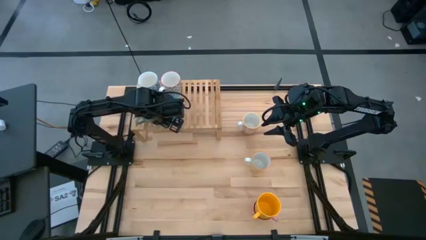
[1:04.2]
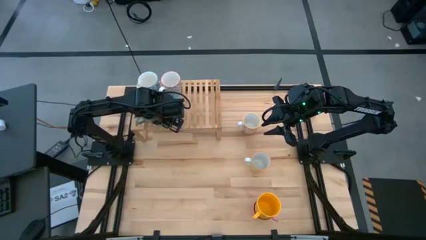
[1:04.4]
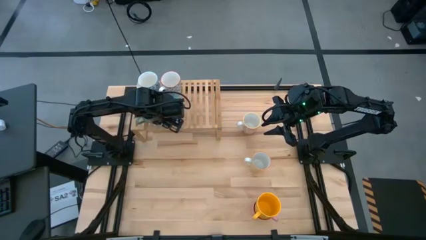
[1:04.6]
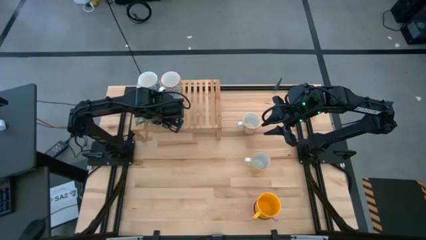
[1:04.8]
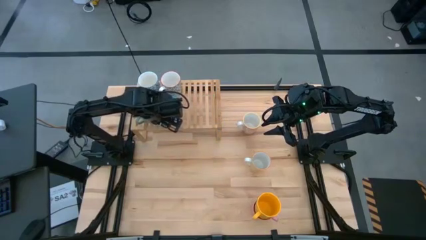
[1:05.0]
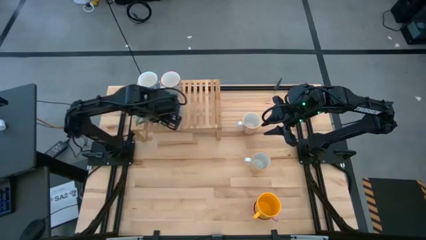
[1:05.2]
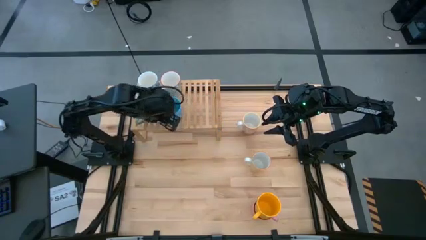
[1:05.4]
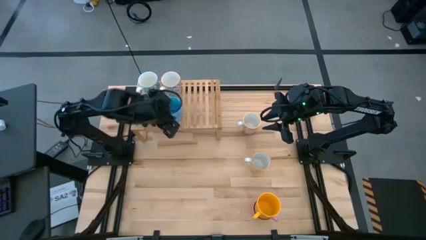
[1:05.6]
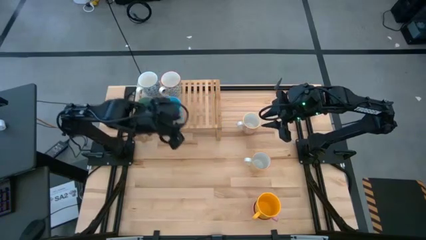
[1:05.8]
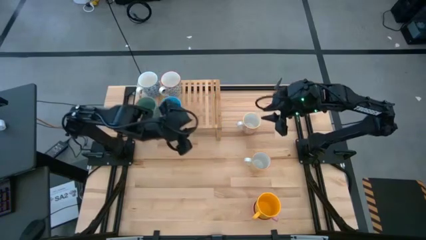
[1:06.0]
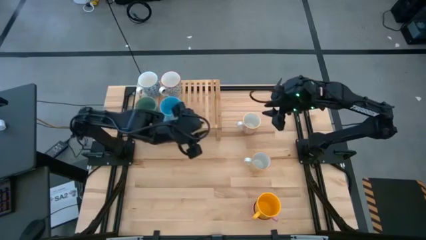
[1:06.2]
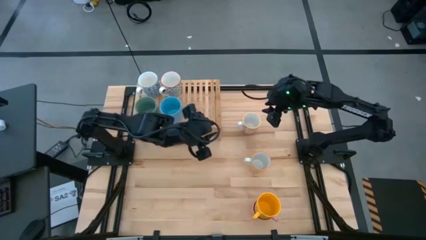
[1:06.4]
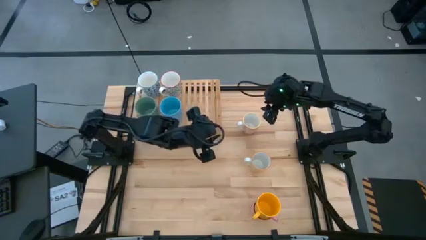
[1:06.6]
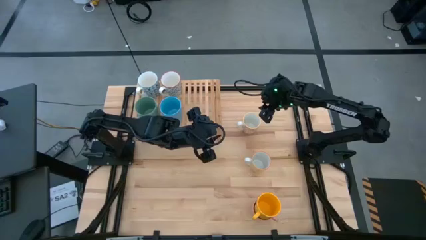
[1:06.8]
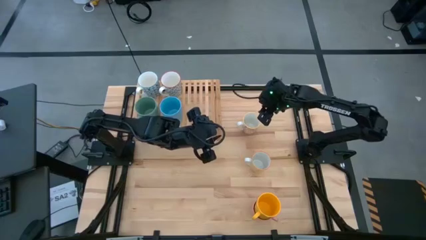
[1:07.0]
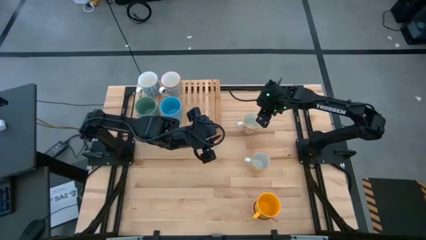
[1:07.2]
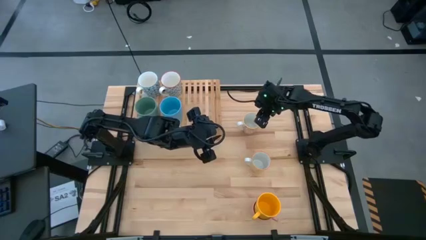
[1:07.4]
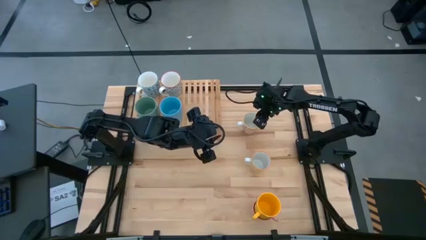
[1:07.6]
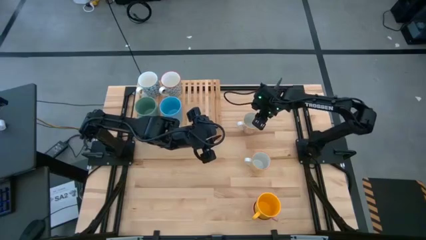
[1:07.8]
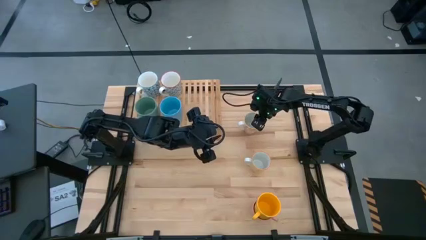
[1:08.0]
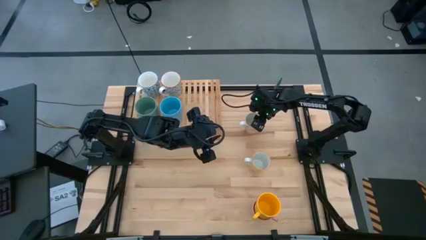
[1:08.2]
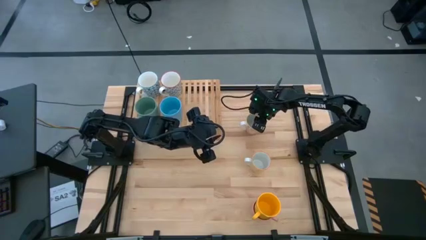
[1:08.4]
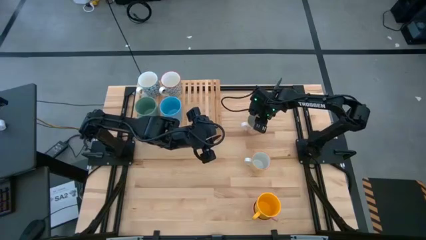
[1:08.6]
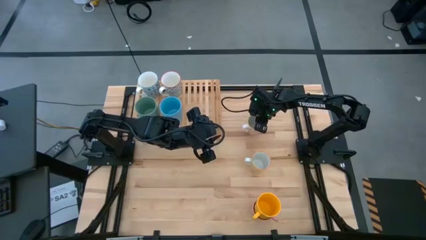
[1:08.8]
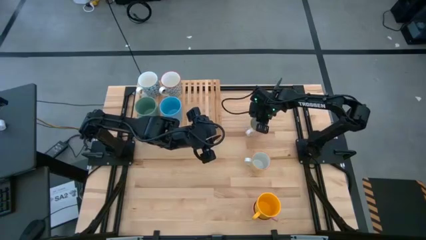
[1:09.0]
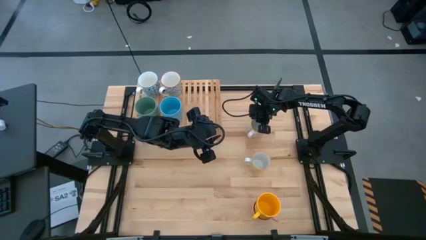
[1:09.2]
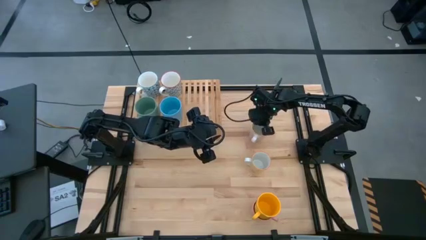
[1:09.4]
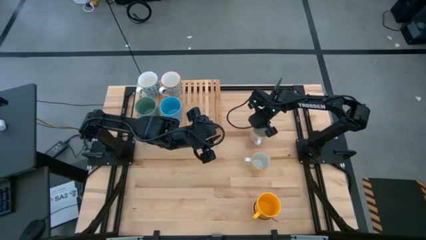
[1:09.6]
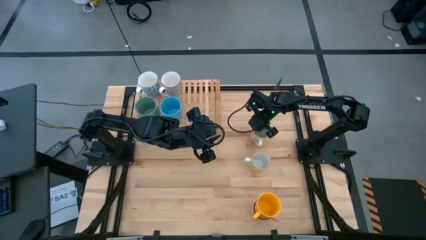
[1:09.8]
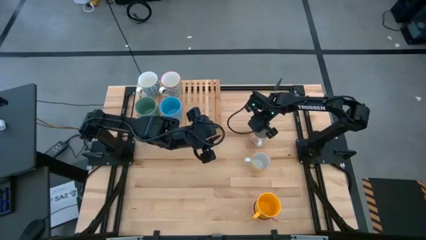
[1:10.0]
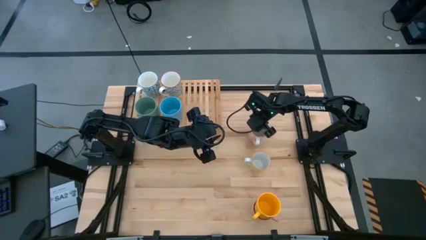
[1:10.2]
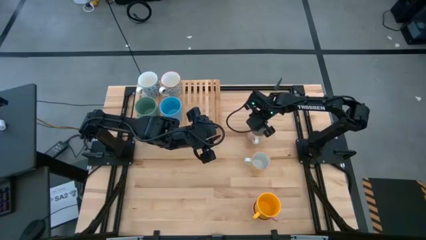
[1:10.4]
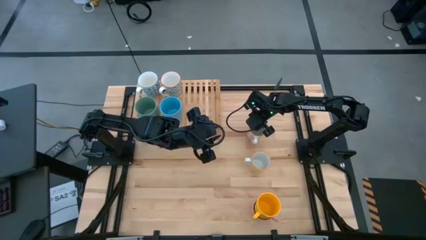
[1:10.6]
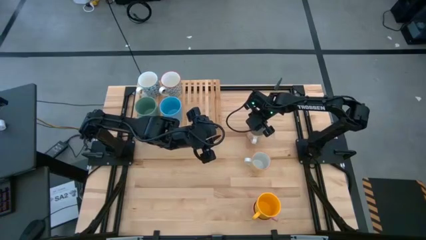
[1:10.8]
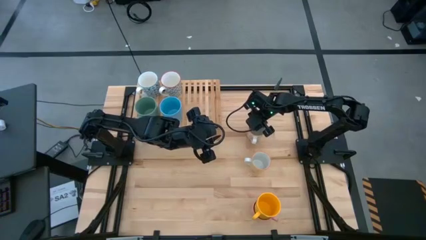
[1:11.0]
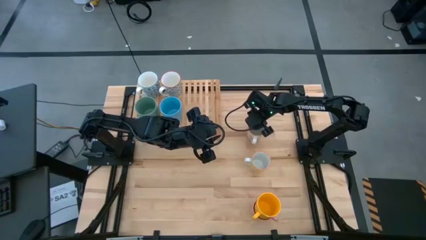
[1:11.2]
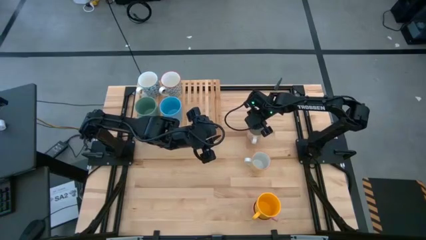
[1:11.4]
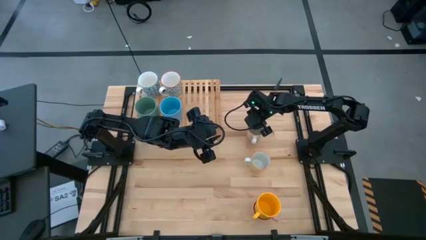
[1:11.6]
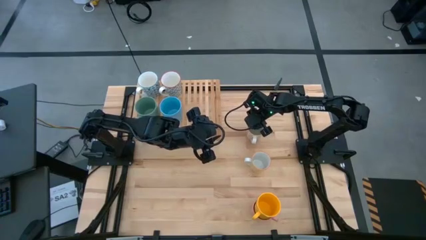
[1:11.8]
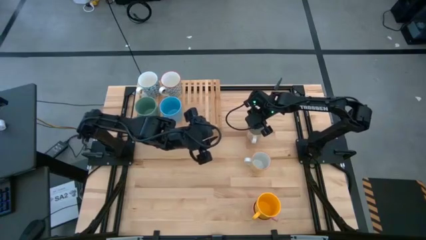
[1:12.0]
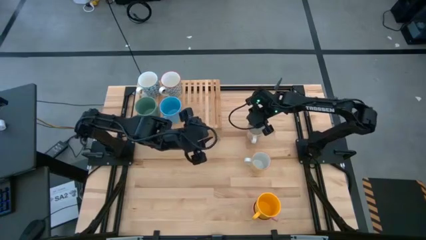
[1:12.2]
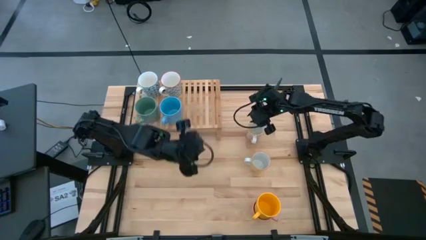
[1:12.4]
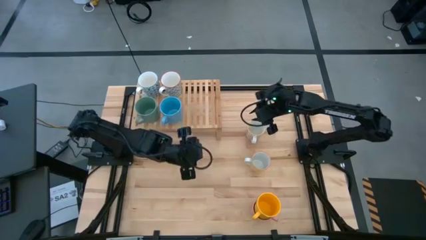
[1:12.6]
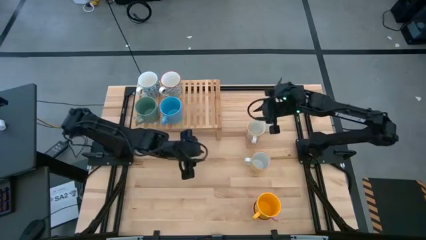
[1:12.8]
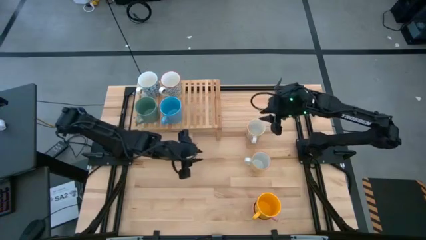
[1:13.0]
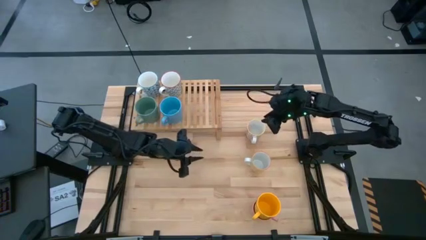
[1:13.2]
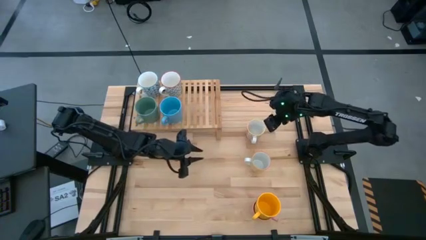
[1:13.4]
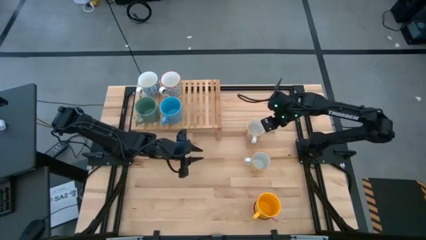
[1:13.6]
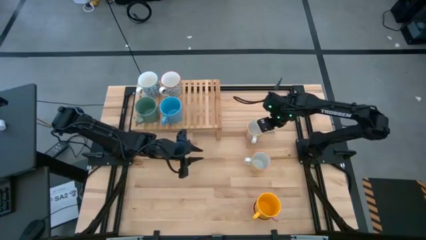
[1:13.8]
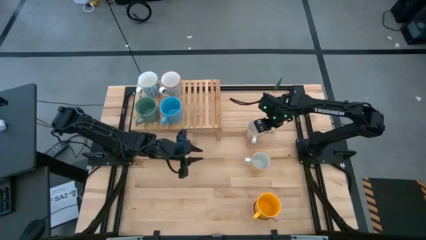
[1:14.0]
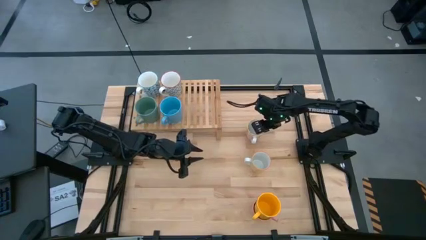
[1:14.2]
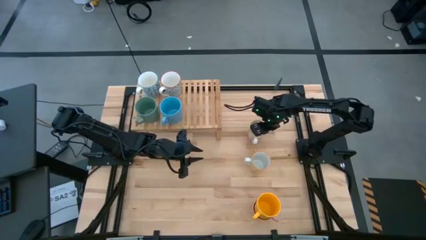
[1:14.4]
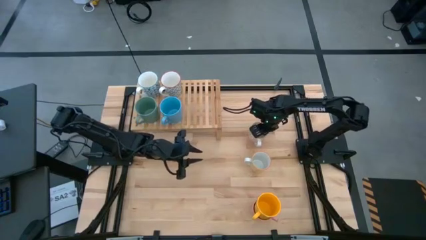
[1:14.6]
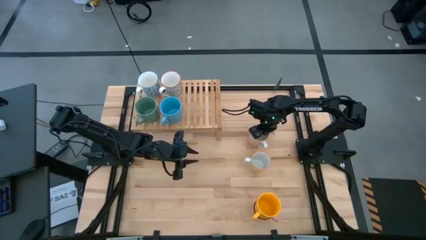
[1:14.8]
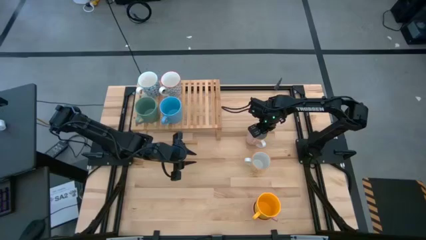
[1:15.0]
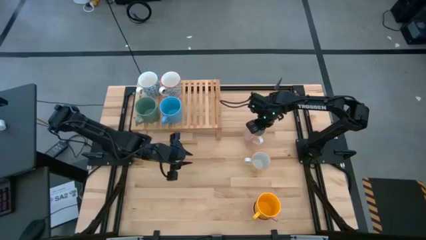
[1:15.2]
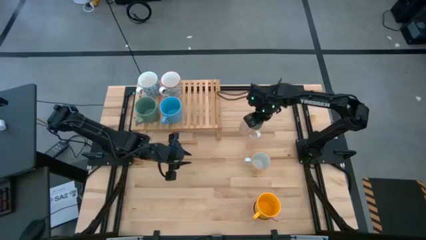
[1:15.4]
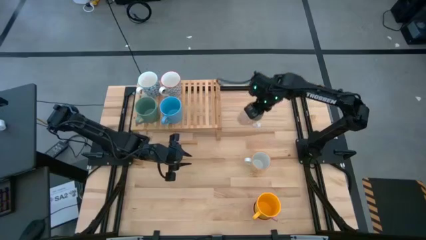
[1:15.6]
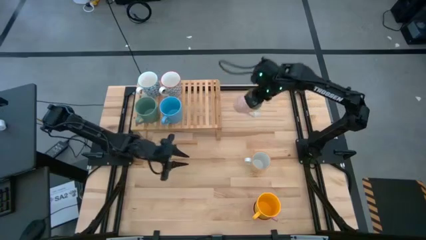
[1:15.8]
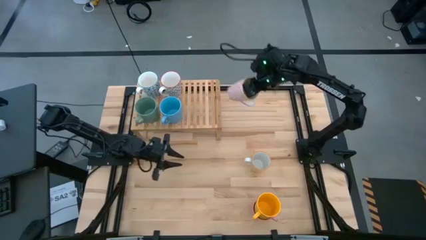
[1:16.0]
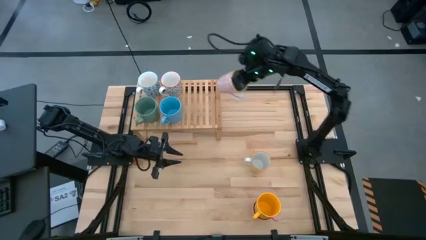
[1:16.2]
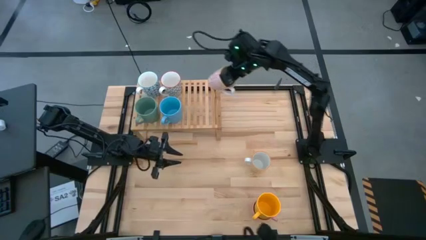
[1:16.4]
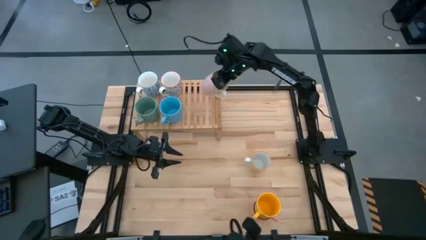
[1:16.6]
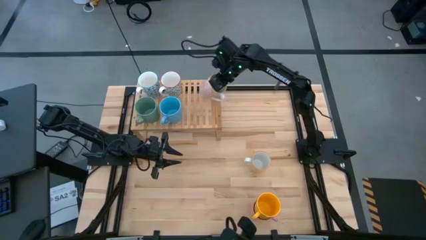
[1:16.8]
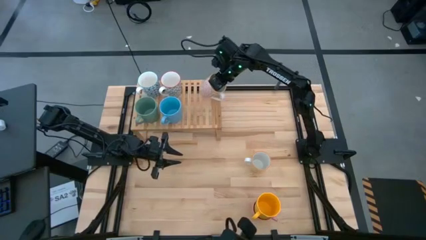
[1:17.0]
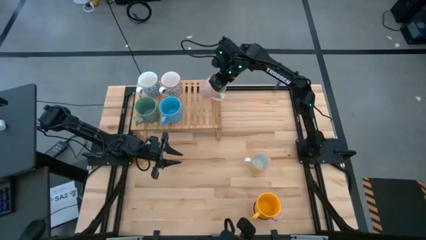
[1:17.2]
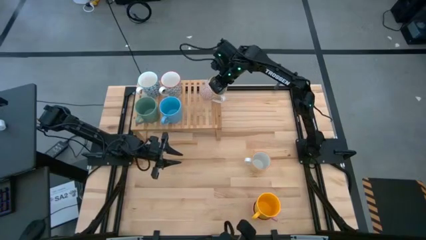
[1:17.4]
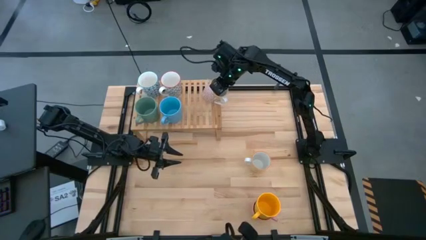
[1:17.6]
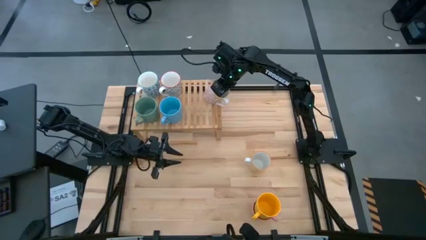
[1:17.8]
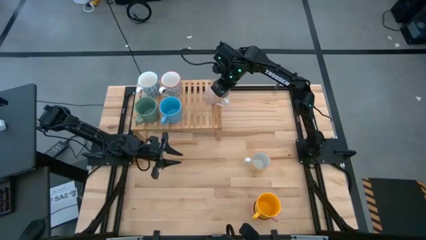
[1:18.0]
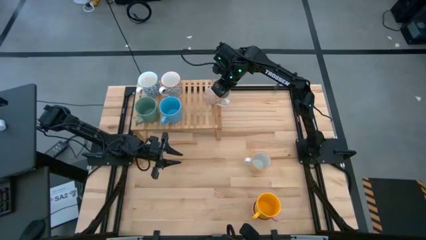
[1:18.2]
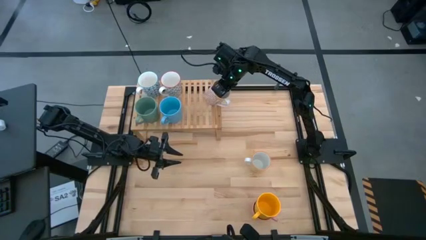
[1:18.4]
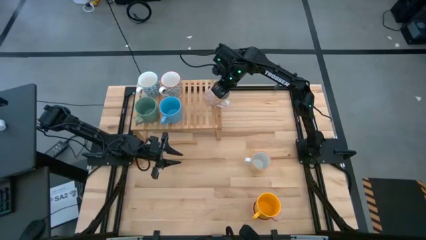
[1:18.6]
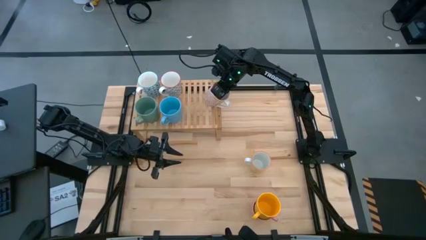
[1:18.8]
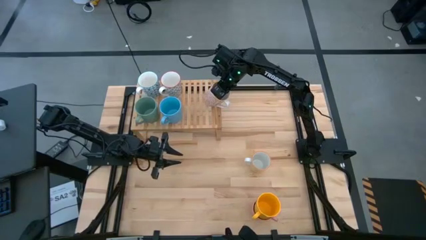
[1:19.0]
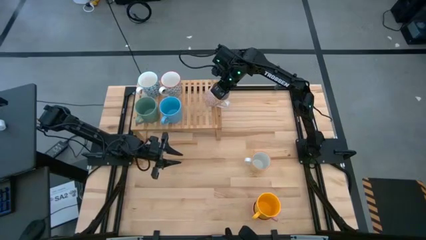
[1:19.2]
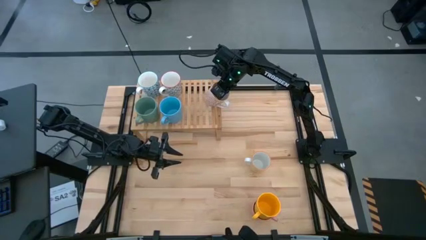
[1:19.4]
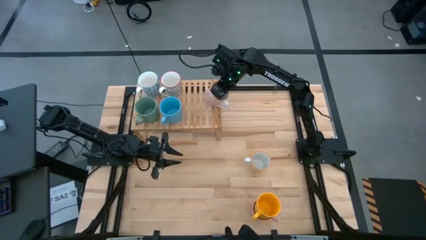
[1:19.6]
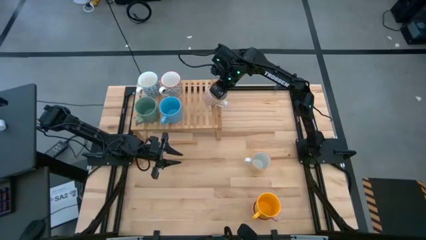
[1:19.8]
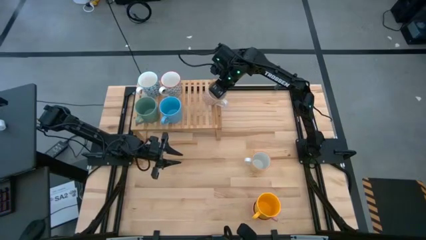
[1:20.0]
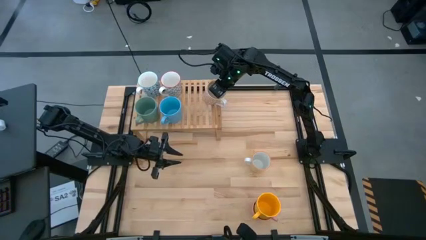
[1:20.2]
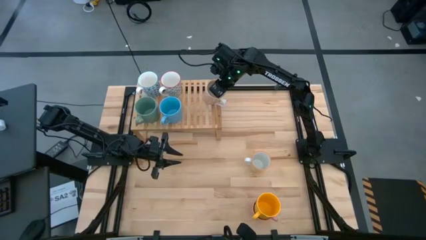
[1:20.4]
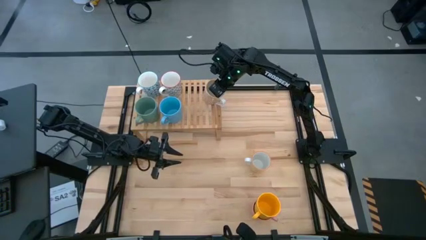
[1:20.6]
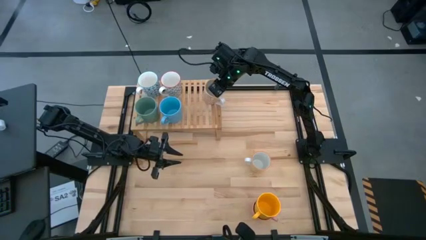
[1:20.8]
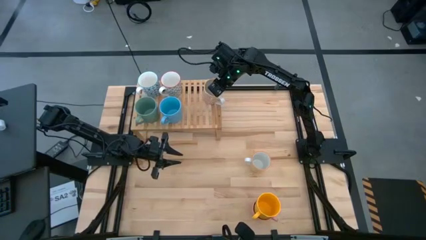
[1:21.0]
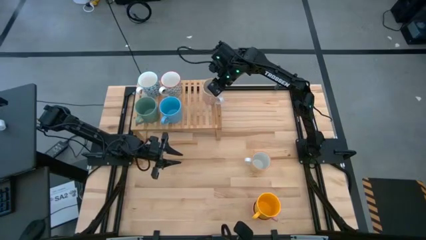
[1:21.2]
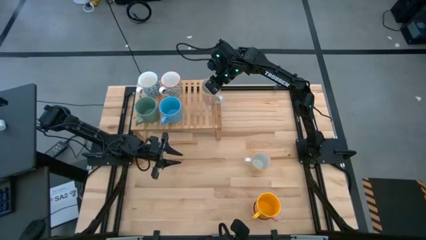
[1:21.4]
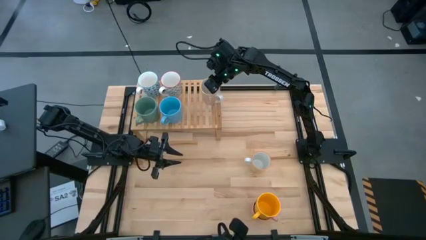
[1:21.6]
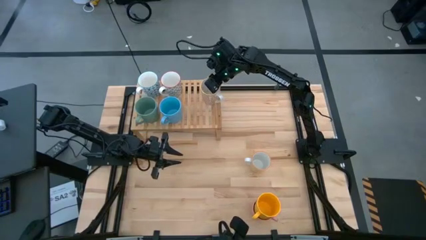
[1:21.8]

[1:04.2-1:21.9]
Task: Place coffee mugs
Put the white-orange patterned mug on the shelf
